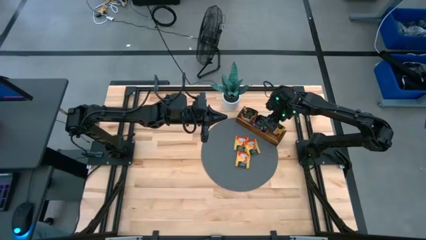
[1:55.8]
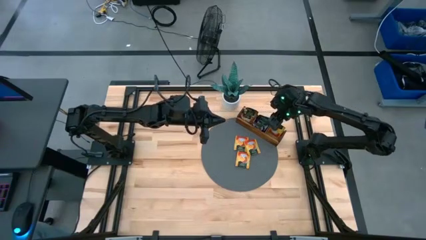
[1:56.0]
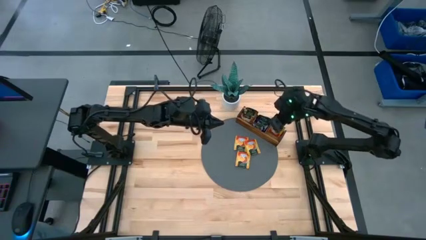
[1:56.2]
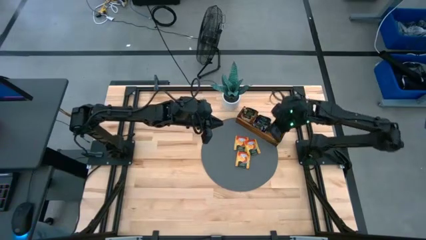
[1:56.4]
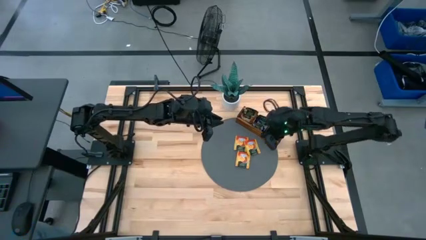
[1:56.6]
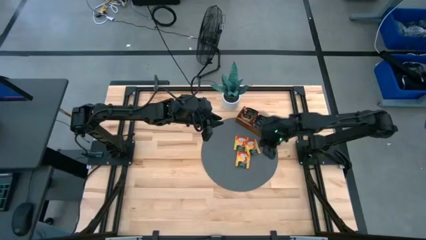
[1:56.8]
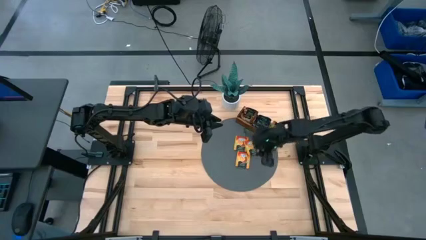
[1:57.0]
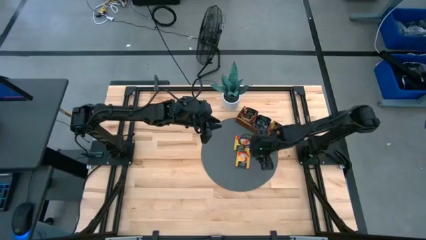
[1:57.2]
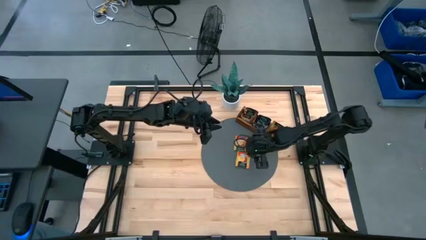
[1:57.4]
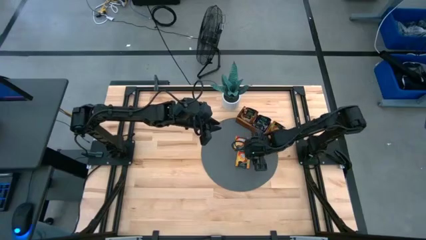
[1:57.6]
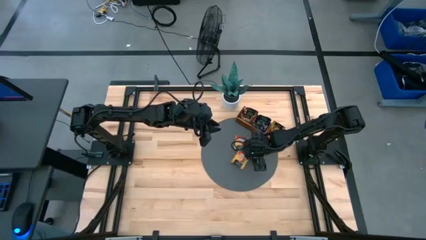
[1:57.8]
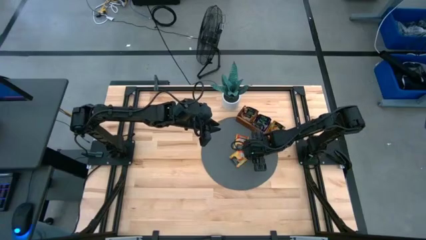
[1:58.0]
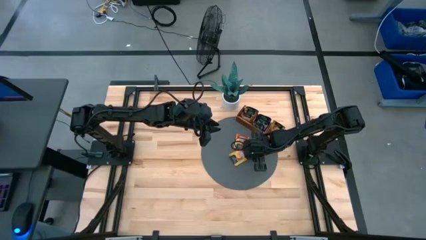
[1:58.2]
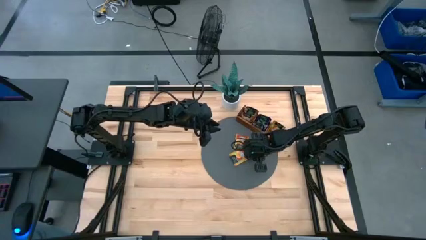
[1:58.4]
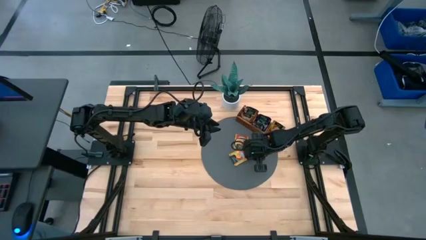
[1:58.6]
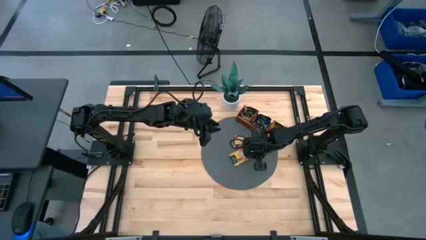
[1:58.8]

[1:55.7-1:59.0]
Task: Pick & Place Tea
Put the yellow tea bag into the wooden organizer

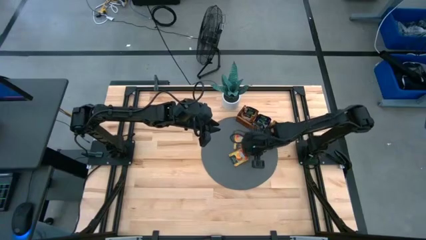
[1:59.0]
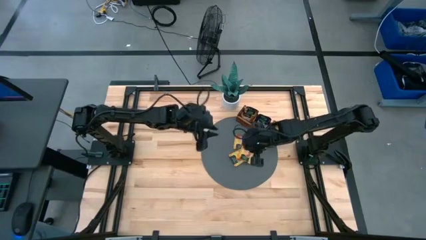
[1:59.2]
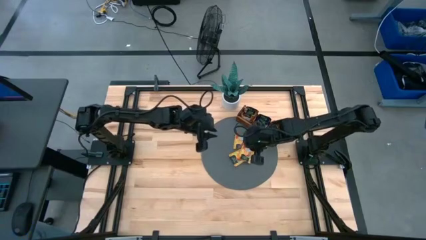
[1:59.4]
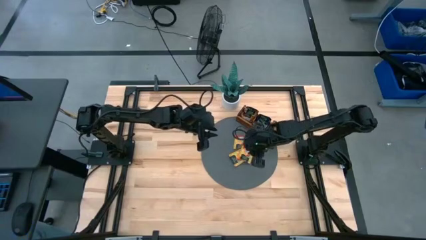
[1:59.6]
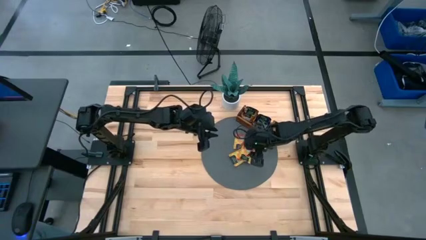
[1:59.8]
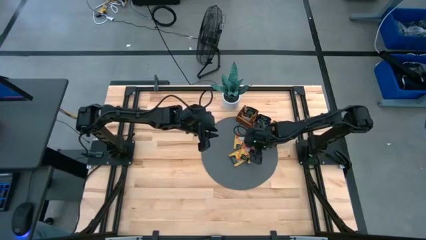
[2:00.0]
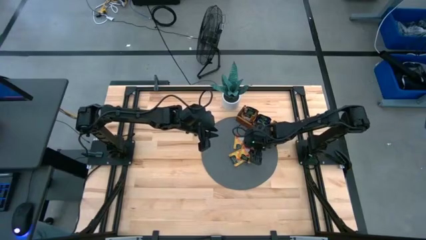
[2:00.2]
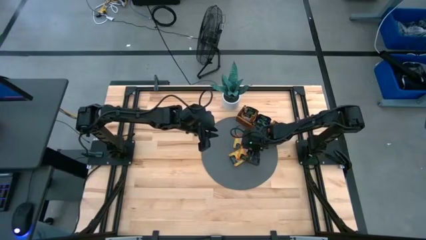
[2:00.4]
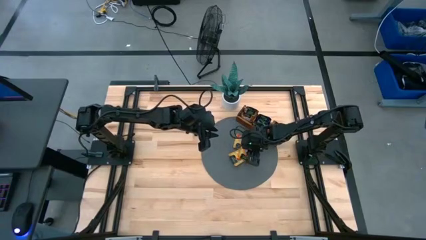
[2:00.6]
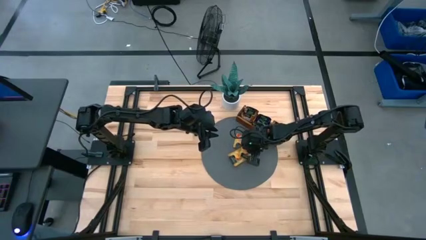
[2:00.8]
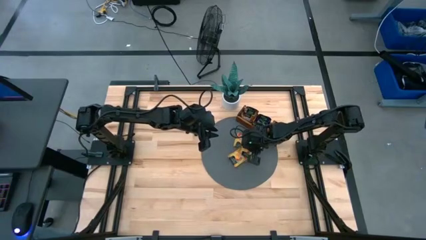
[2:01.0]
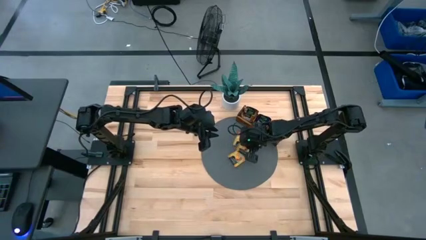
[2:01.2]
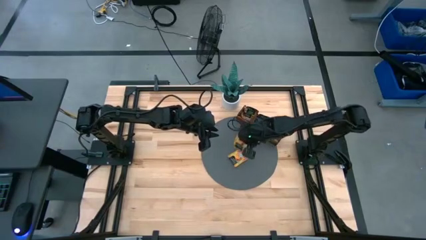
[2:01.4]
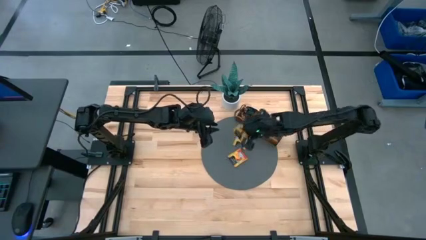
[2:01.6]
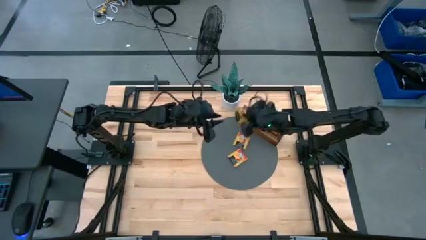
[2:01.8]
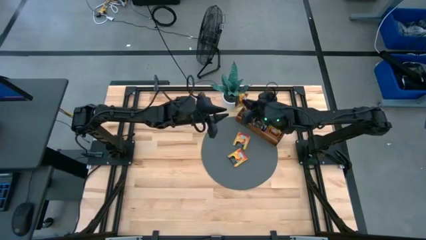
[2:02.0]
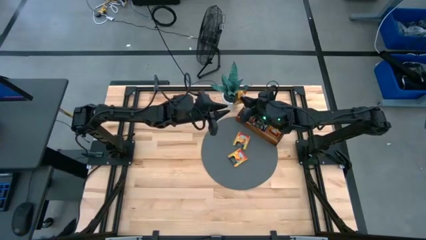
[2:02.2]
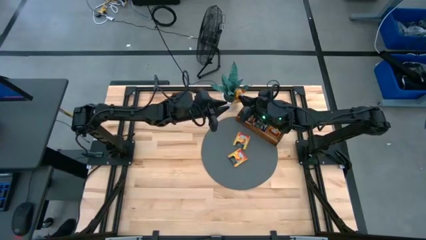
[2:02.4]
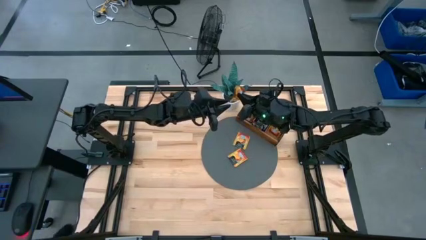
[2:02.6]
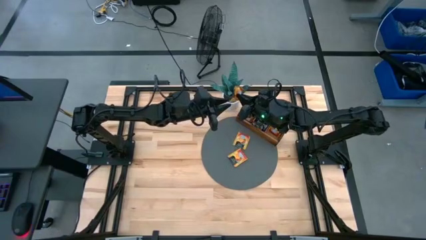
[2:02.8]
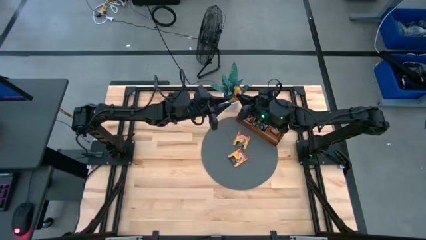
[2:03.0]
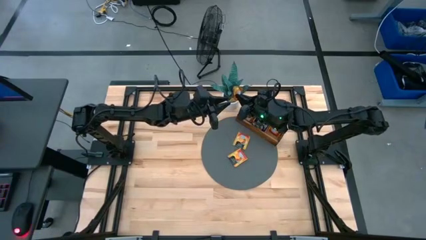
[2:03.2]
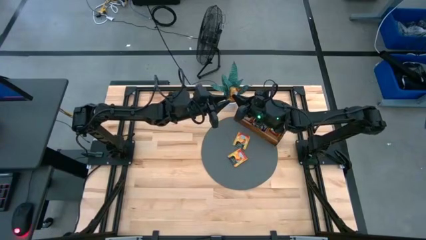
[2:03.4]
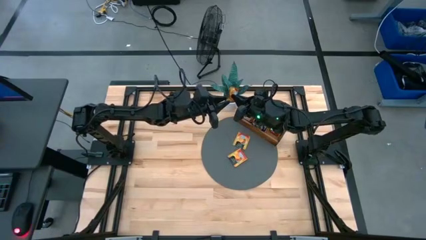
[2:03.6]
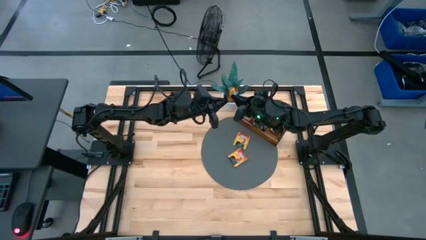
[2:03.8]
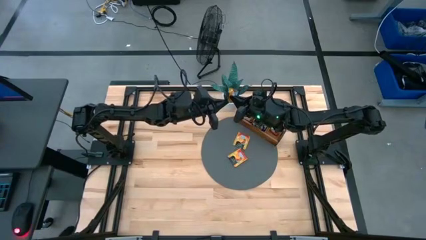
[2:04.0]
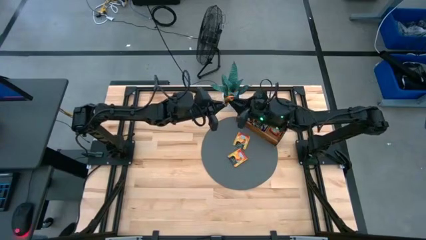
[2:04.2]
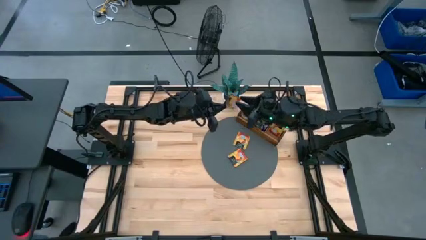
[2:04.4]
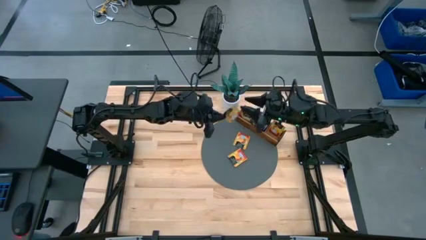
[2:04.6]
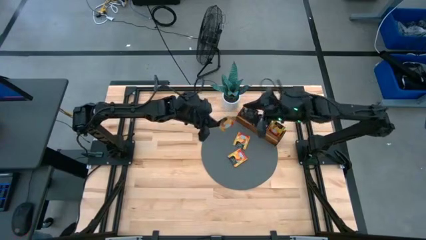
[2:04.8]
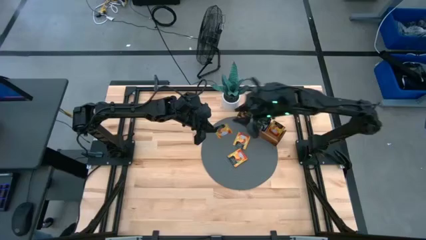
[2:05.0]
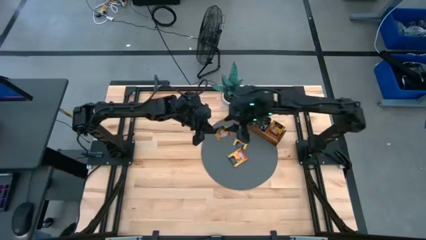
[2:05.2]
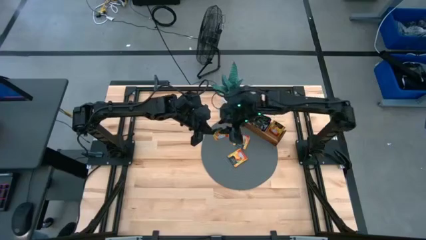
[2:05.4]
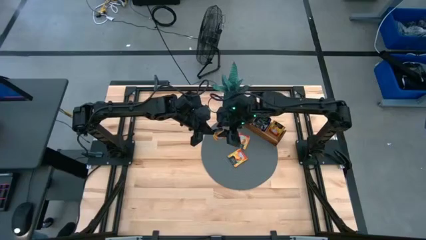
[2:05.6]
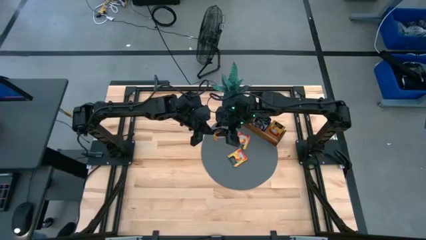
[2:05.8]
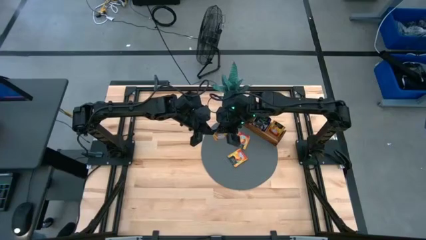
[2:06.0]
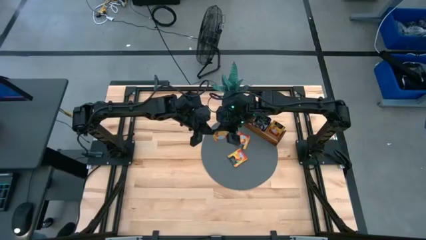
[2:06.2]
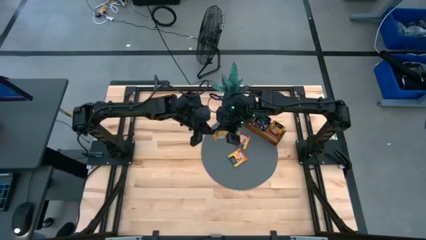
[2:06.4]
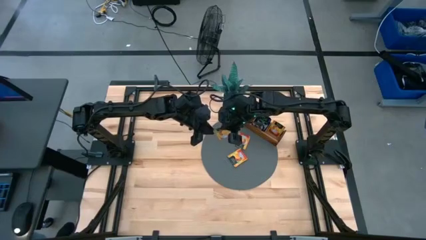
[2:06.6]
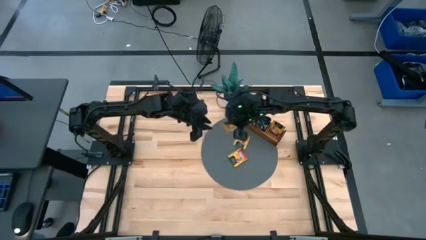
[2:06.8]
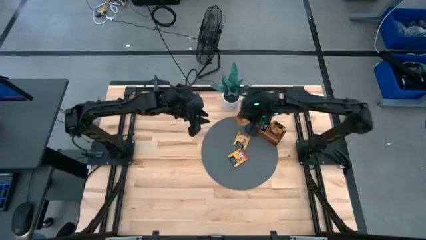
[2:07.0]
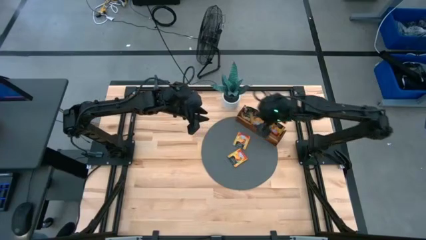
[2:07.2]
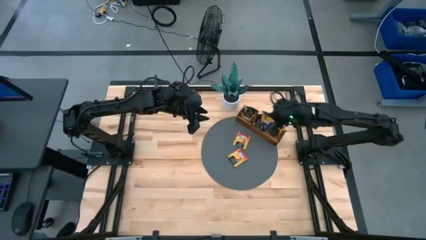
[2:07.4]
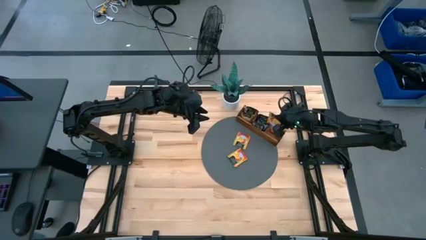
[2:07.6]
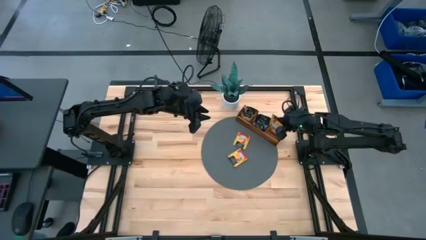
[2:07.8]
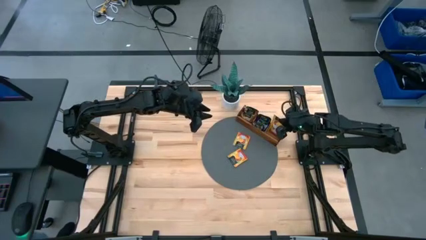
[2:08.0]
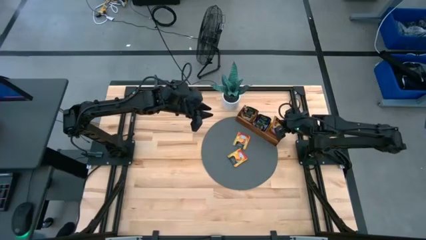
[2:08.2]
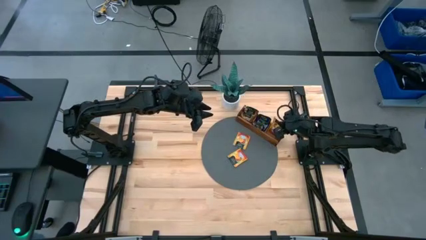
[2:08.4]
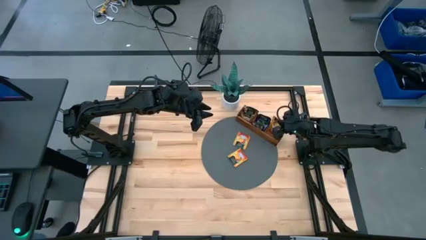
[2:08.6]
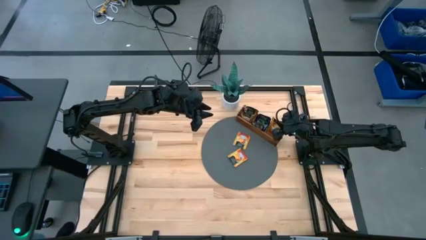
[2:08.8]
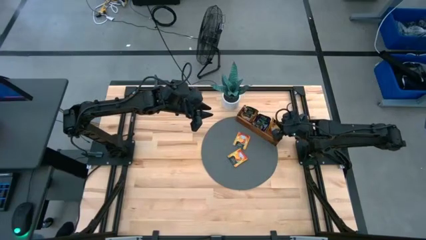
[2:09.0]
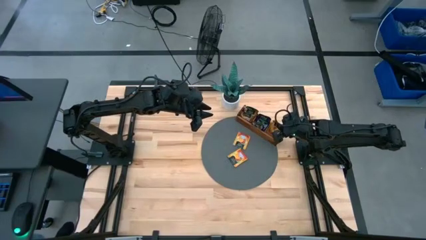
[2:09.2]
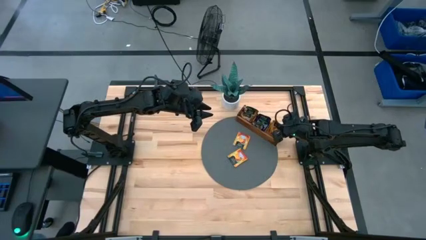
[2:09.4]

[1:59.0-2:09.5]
Put the yellow tea bag into the wooden organizer
